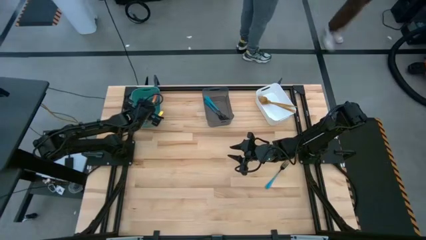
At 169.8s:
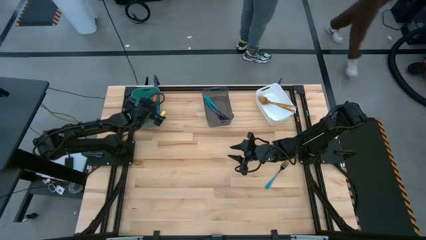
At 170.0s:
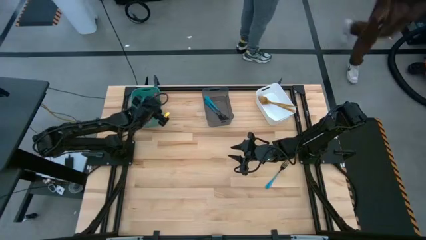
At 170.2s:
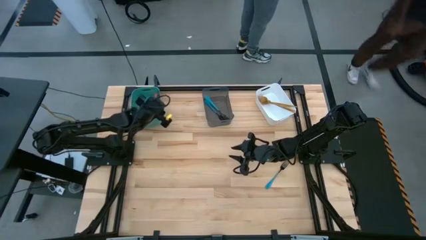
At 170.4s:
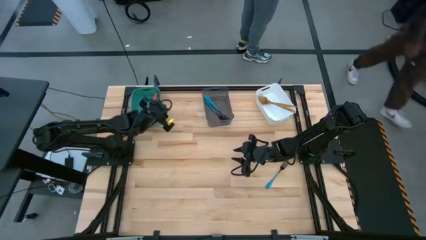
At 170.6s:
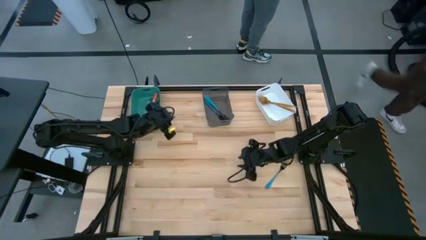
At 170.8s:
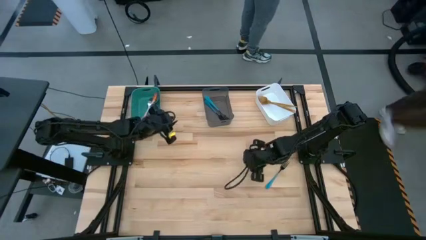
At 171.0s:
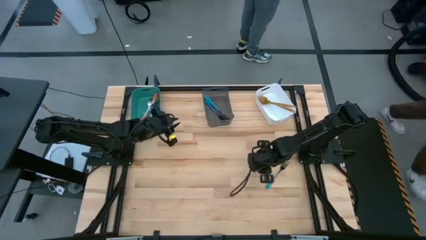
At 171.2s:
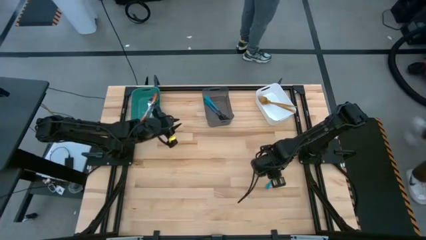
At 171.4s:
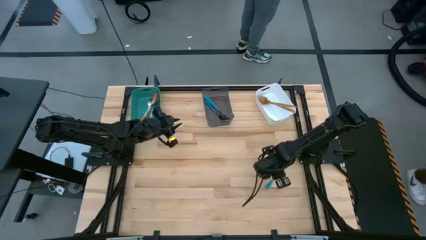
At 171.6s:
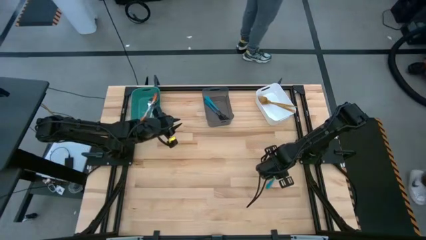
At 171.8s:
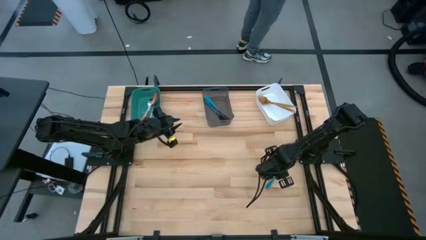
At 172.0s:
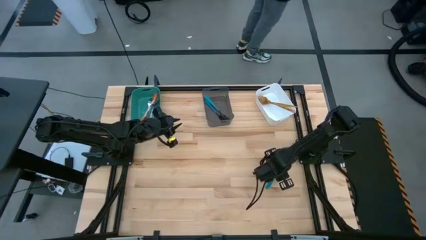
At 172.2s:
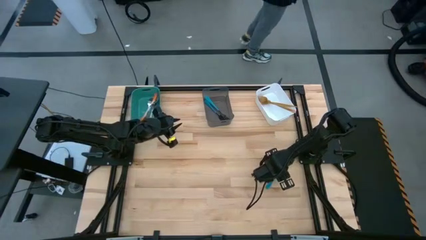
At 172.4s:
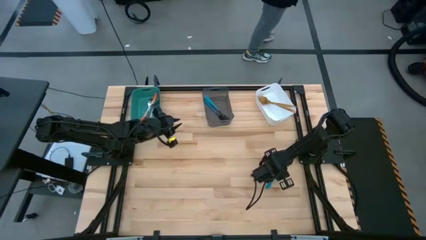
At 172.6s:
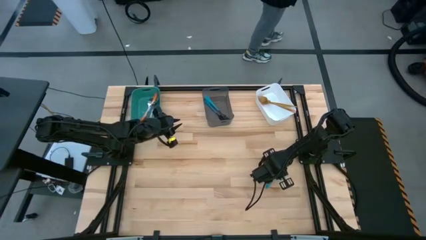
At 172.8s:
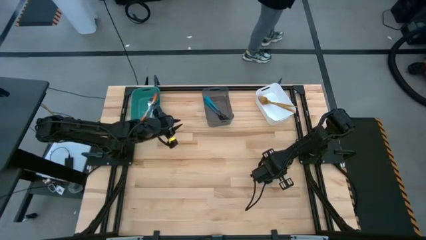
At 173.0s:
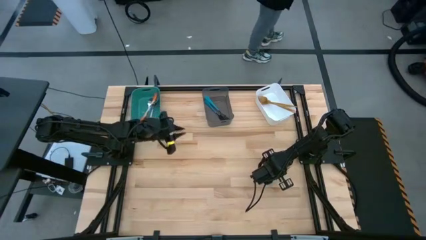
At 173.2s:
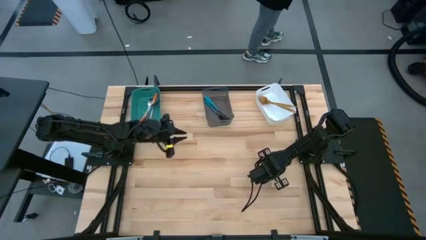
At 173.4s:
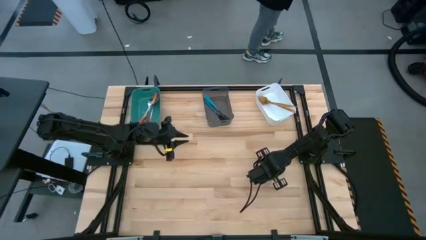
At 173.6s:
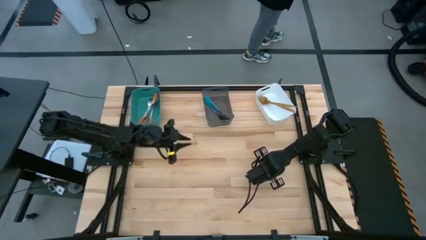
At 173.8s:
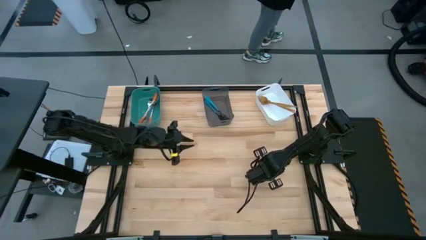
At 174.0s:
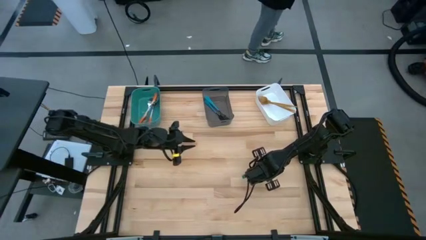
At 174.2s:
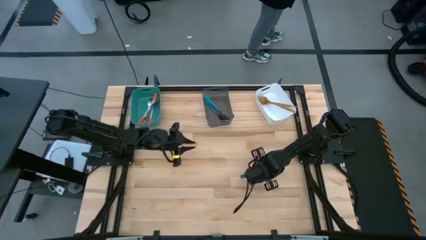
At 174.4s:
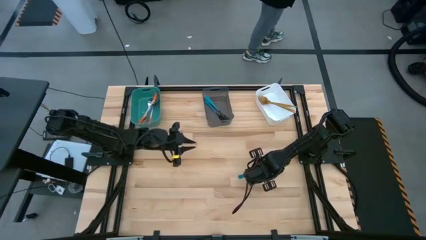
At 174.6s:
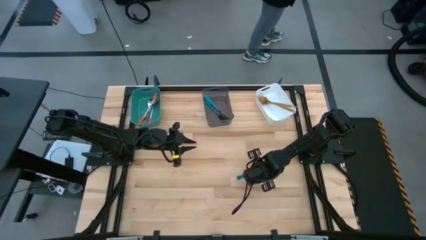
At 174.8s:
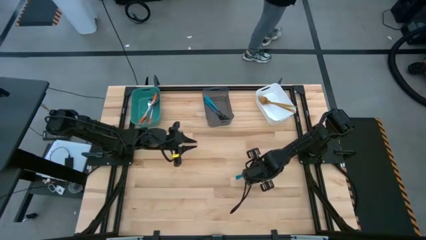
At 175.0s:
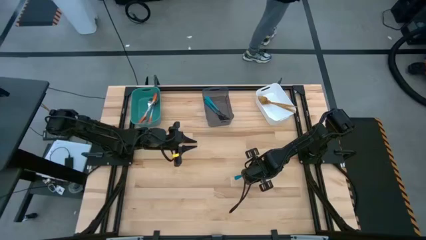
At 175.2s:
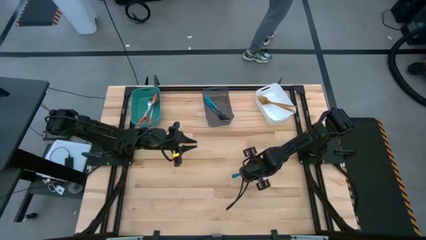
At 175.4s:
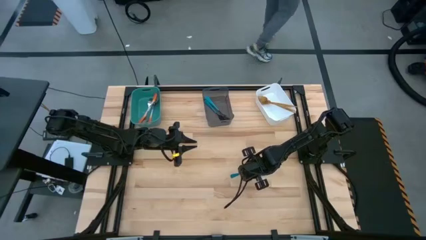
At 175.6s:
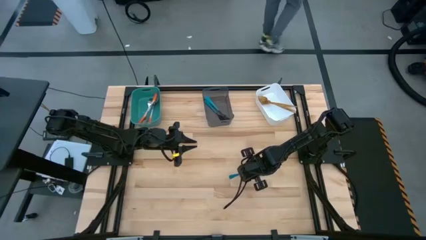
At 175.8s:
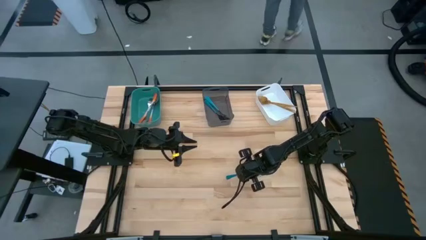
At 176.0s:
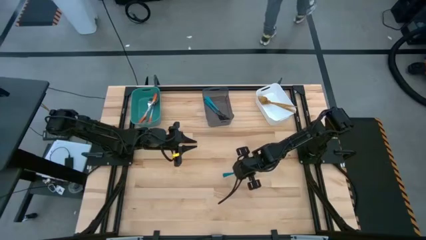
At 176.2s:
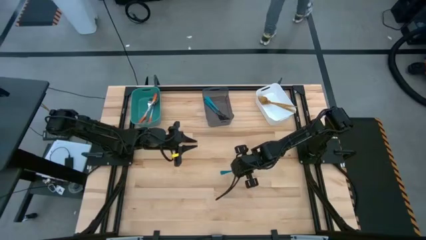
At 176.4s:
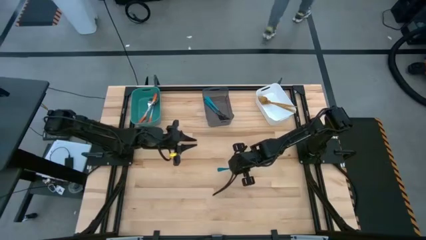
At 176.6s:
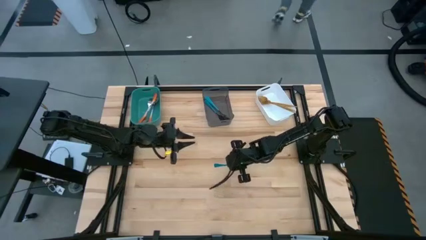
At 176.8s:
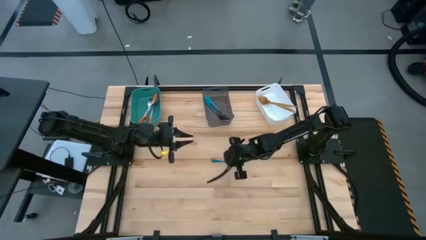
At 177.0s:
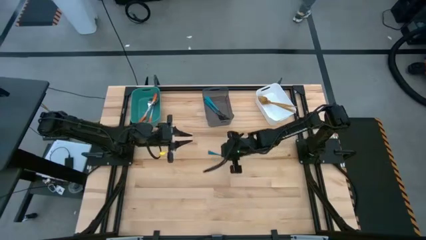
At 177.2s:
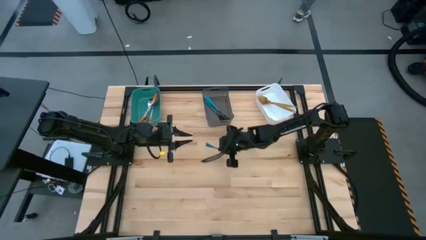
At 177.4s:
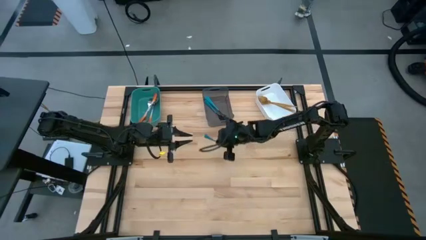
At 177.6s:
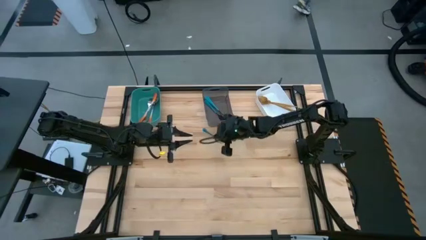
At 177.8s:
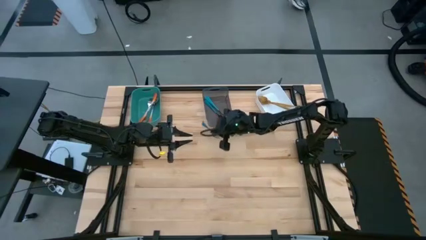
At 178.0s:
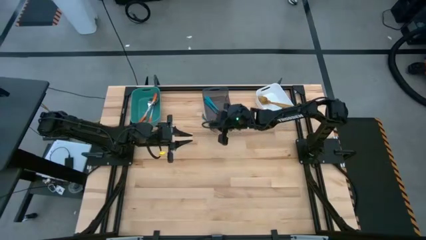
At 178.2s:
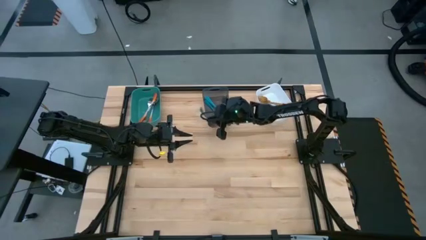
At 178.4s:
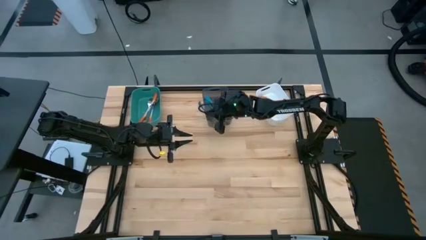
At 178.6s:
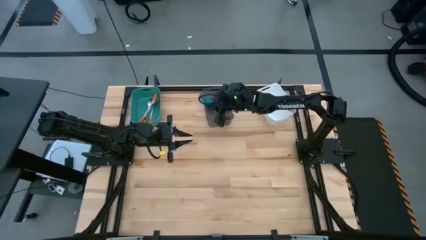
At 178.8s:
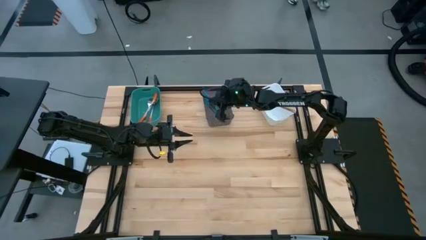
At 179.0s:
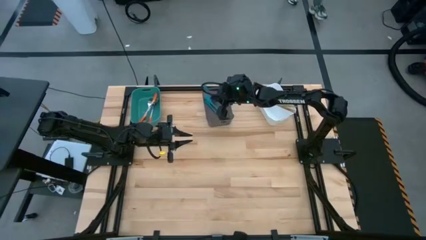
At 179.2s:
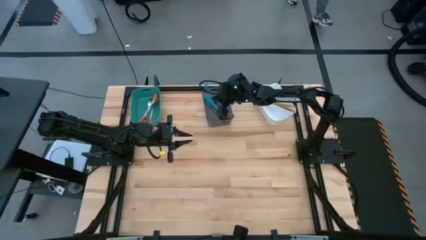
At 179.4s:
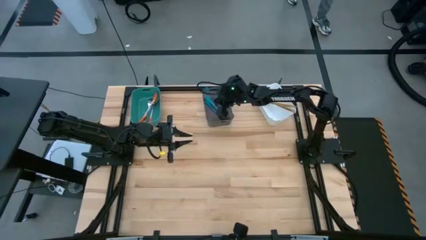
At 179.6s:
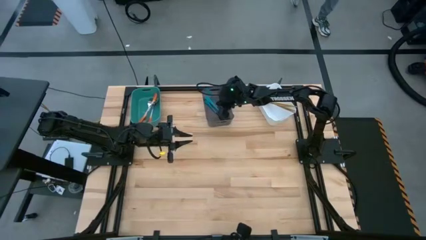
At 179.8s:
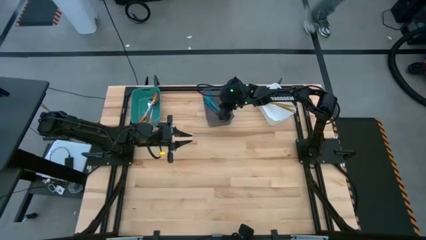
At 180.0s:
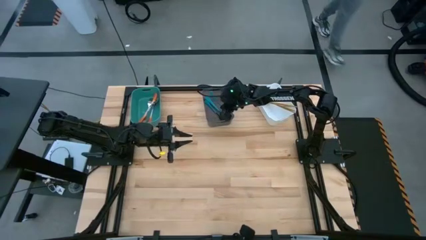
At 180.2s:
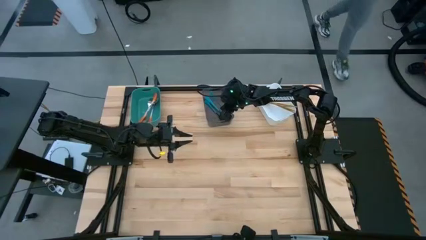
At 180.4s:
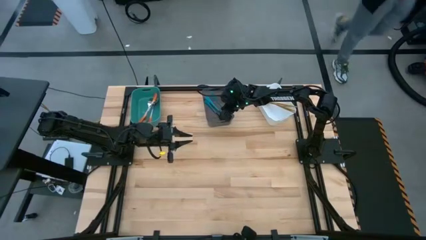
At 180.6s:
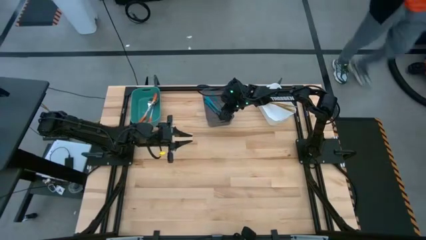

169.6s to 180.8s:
Task: Sort silverware by color (type)
Put the blue fork into the black bin

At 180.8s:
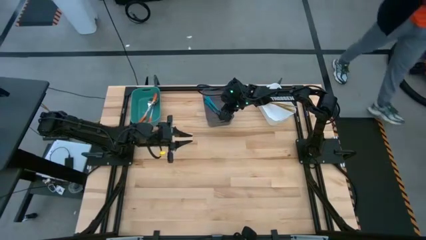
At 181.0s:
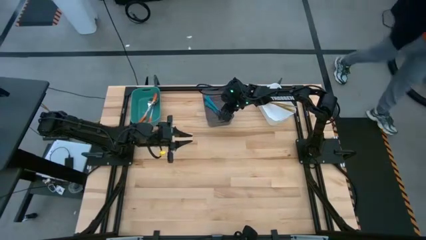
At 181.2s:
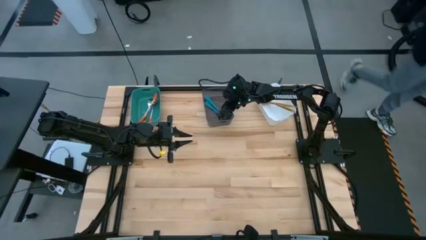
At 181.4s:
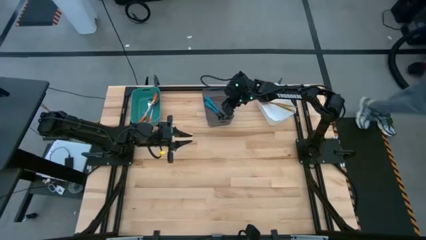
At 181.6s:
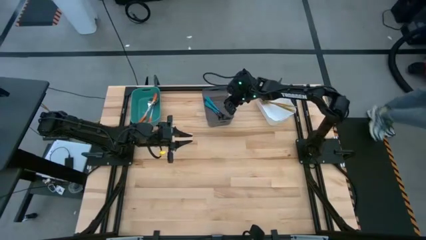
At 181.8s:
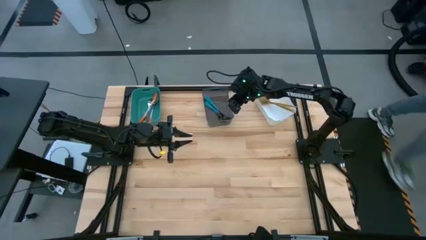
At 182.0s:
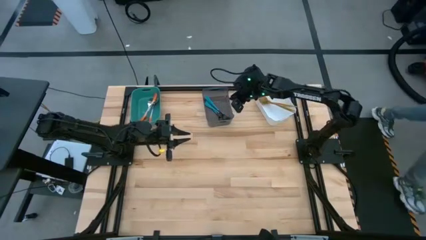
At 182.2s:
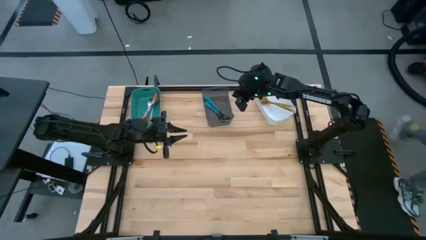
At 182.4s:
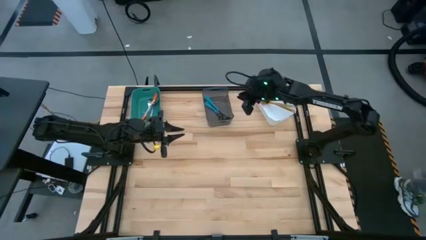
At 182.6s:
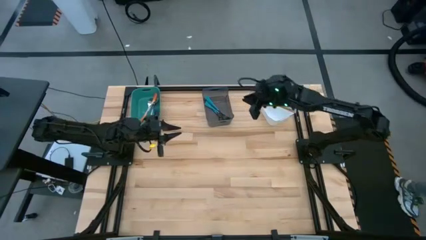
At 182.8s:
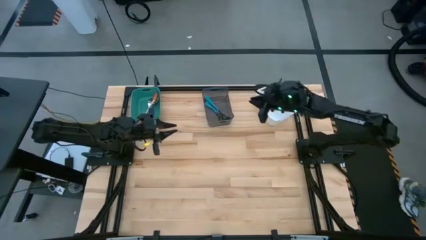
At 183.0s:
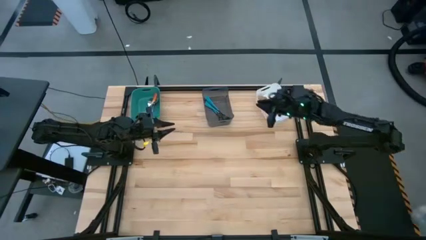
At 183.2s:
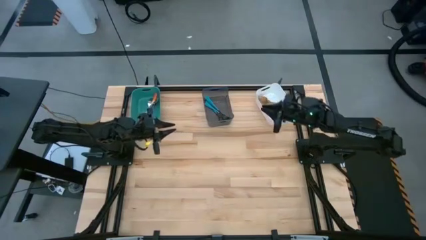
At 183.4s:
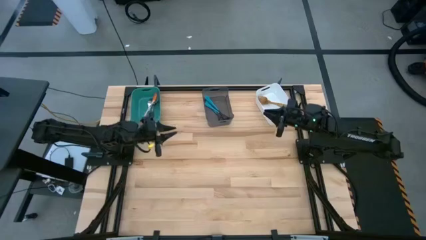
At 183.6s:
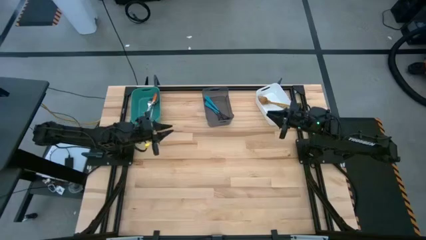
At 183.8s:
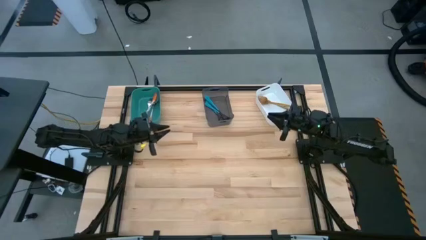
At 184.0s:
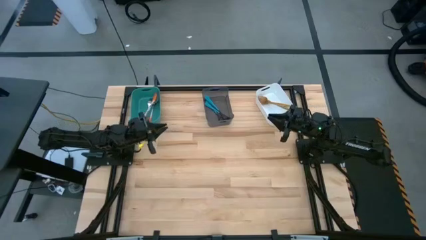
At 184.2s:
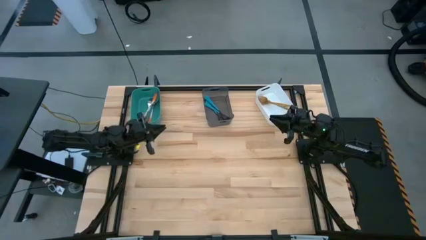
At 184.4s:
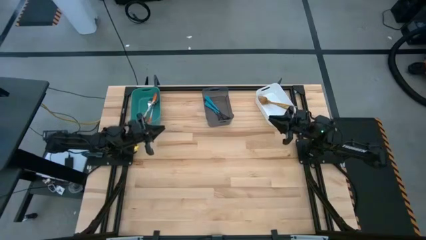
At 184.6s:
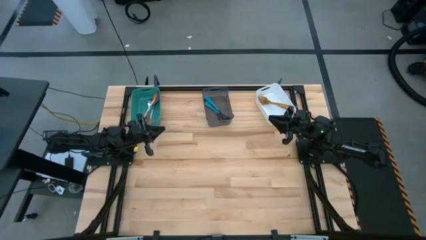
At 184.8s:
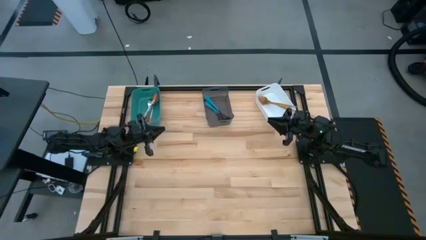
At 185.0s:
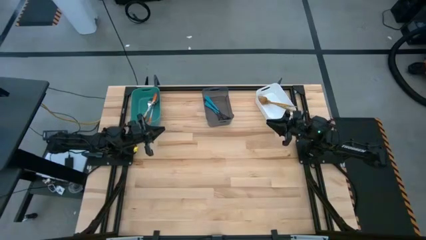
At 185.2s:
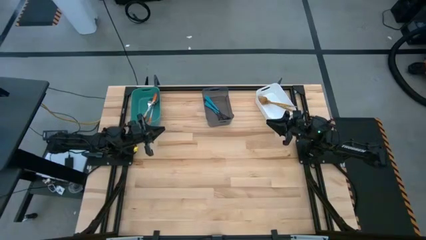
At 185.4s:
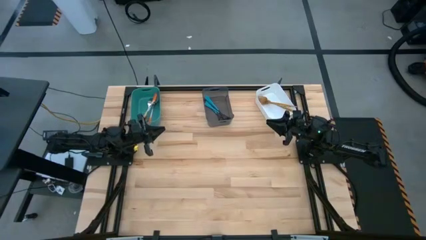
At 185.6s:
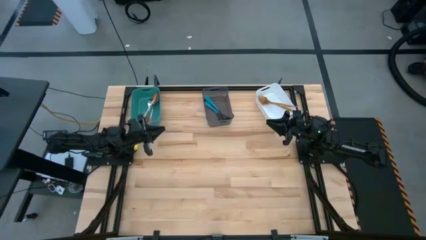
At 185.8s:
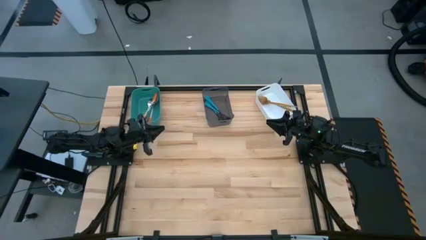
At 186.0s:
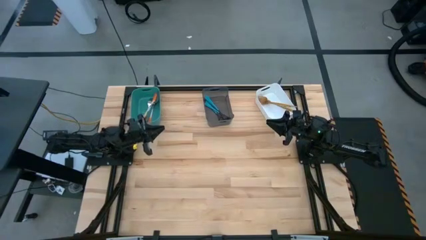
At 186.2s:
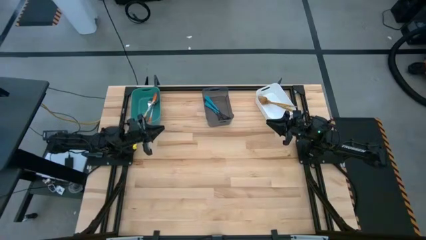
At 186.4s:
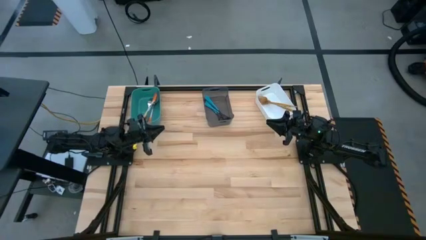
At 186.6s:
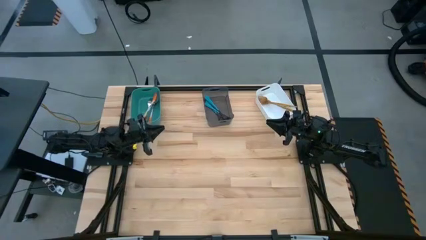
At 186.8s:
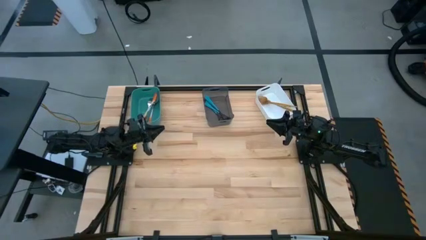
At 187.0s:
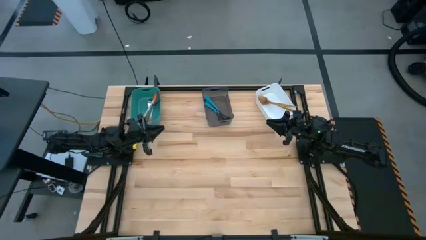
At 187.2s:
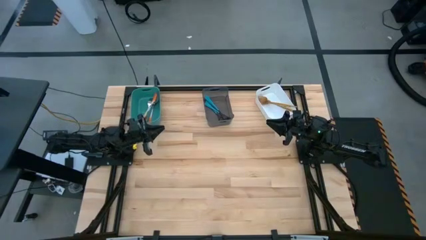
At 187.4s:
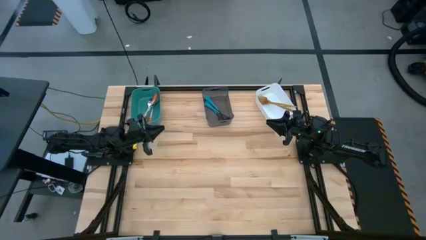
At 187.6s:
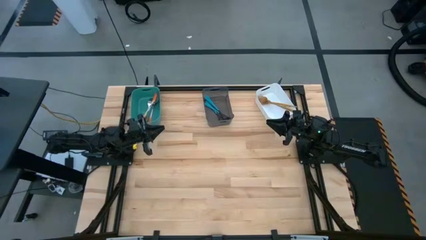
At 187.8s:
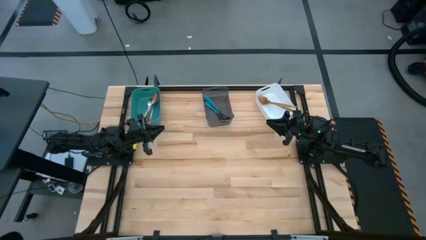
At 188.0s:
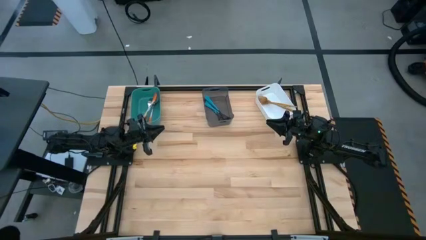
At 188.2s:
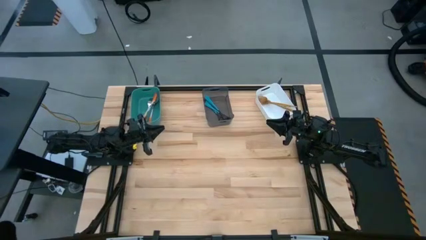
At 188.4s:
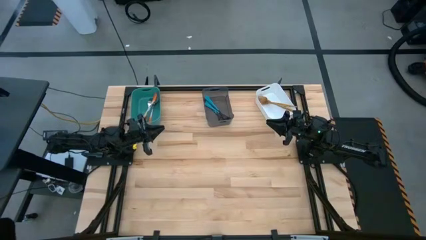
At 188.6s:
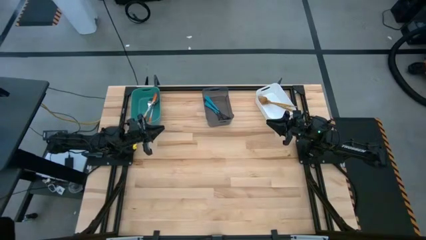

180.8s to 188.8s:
Return to Home Position
